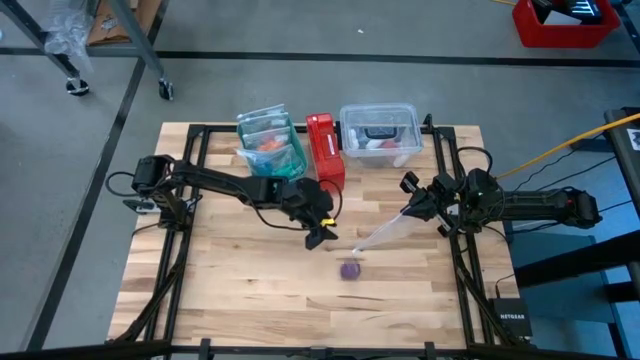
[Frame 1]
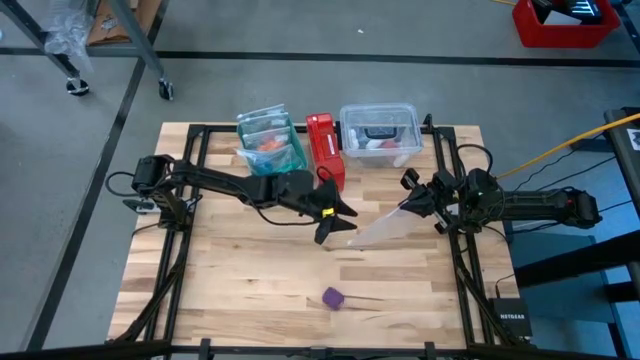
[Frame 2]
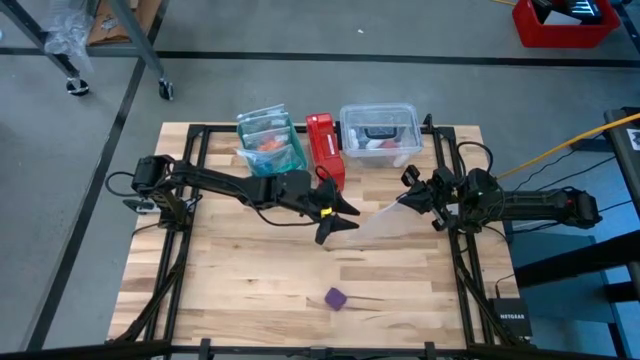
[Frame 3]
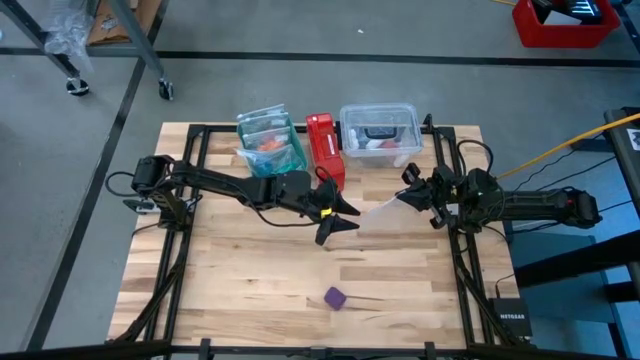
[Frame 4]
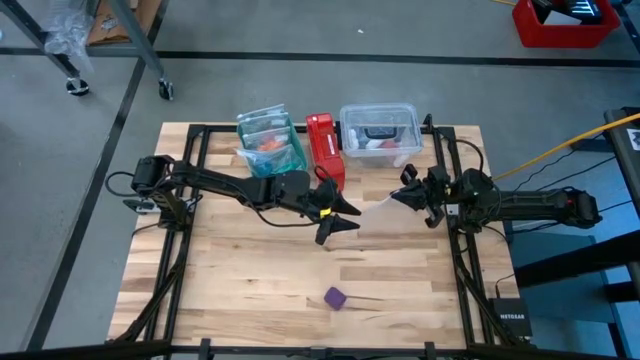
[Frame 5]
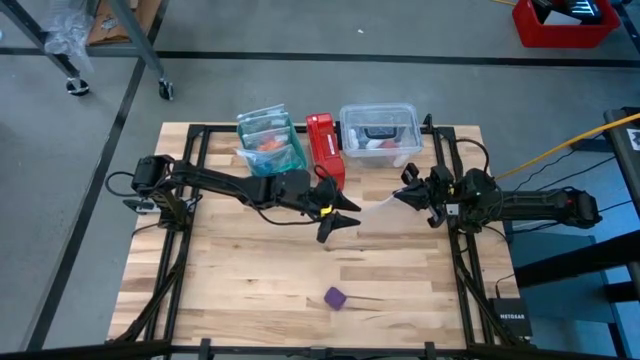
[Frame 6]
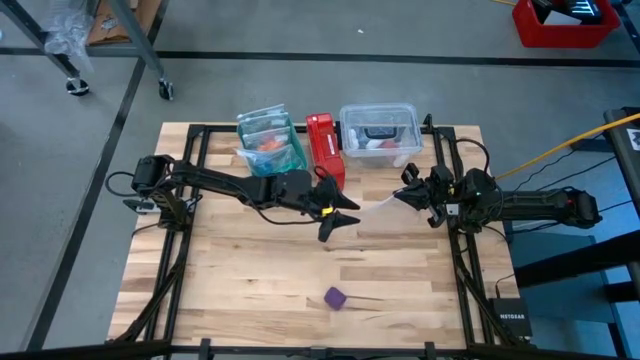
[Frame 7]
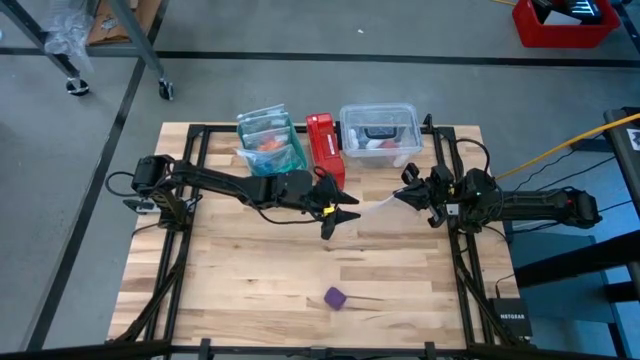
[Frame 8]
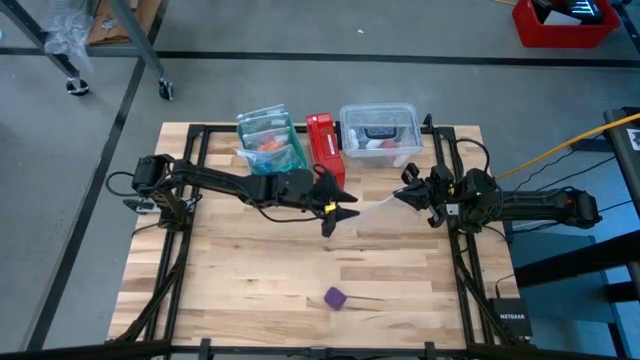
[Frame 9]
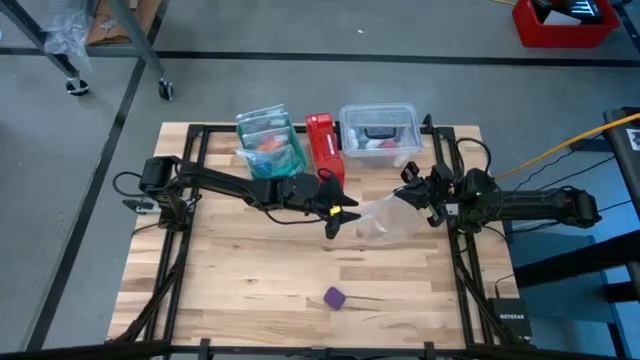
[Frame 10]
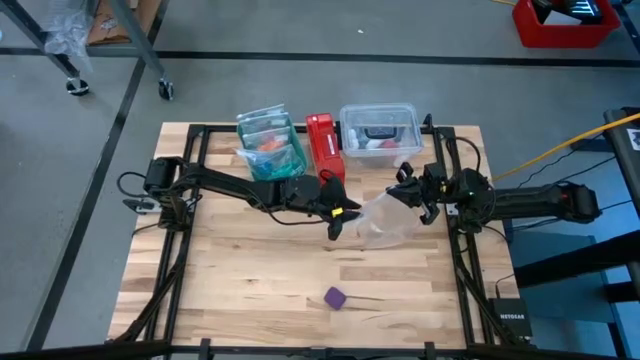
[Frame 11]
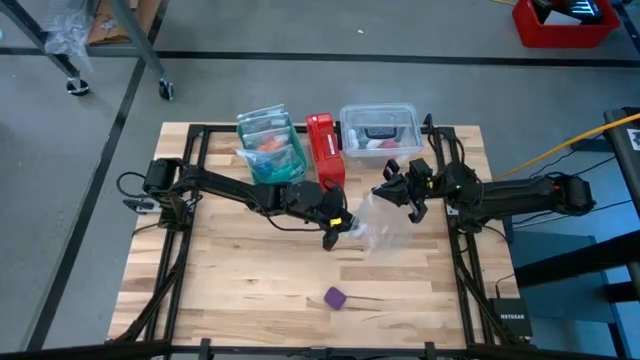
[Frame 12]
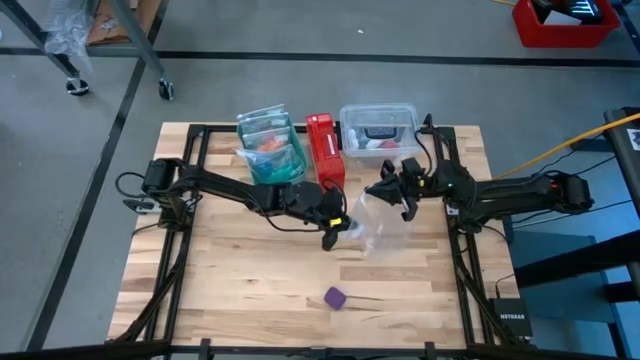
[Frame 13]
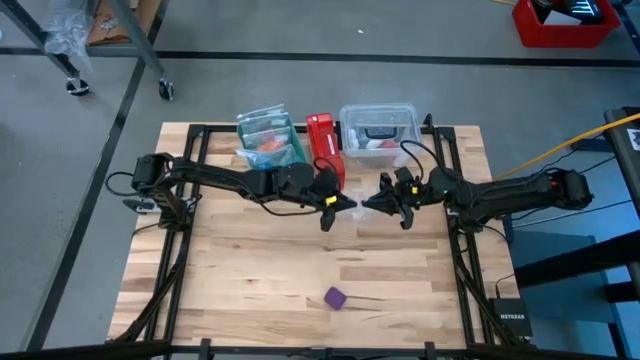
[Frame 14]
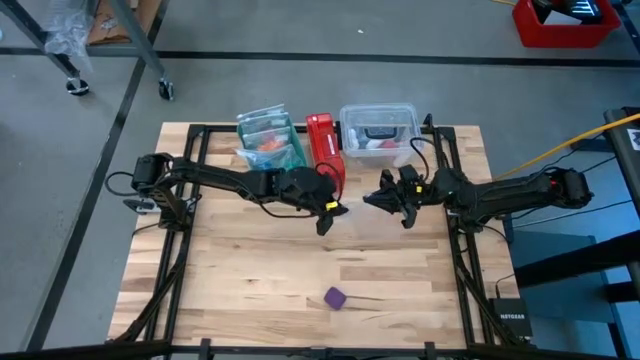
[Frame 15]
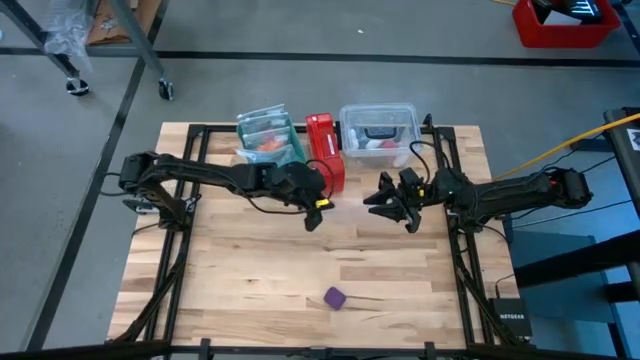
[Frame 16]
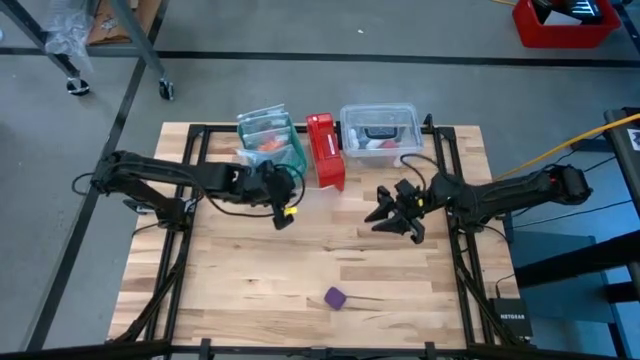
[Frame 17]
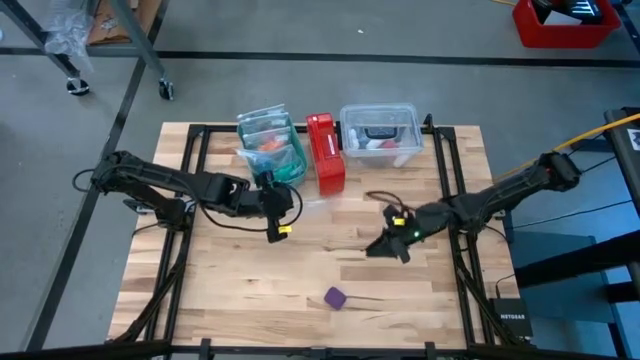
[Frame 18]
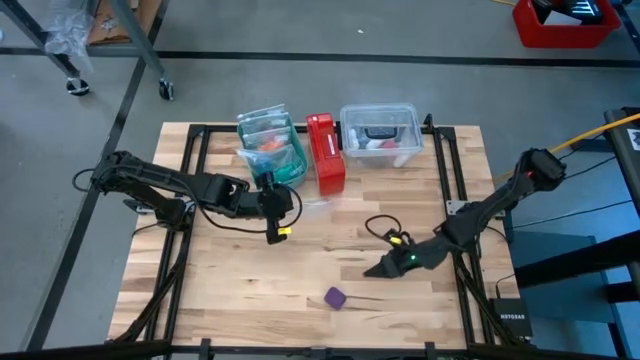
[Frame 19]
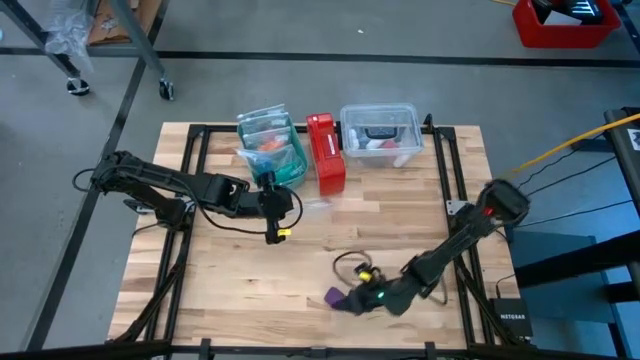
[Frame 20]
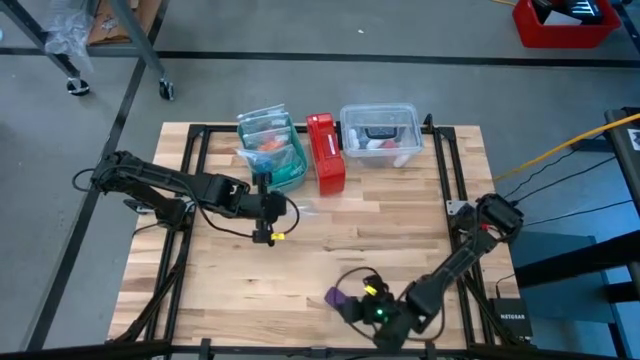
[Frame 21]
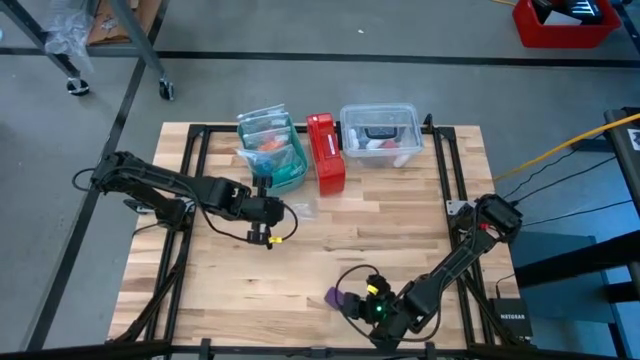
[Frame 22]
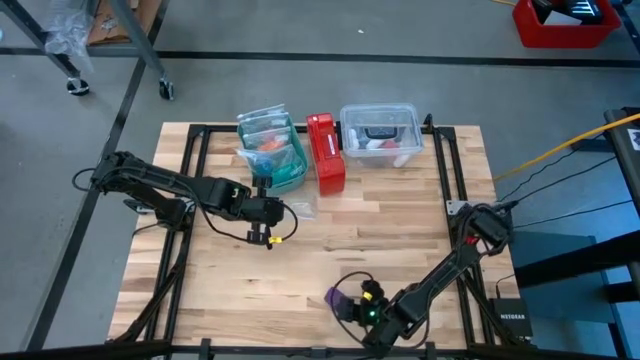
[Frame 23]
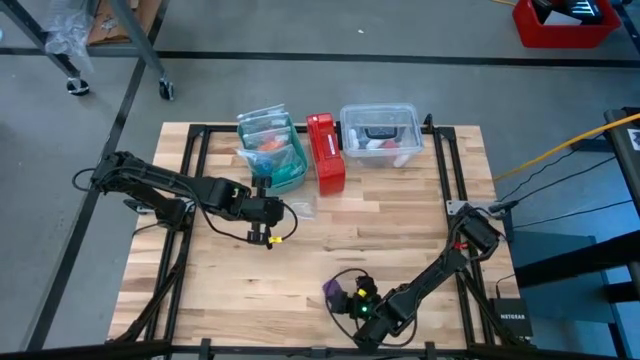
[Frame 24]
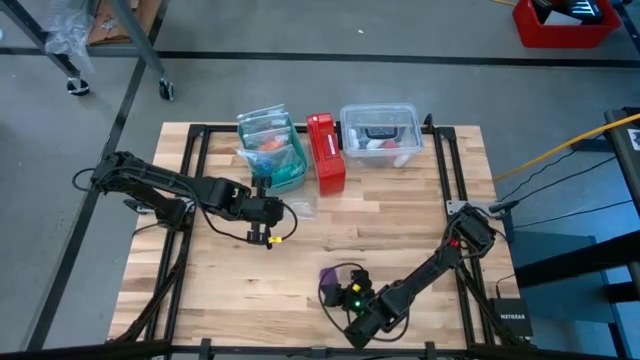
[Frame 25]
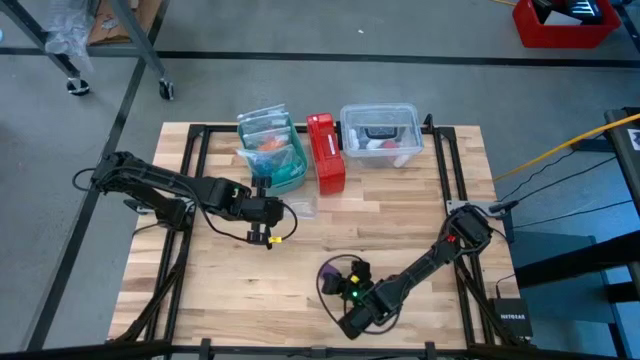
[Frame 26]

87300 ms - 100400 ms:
Task: Roll bandage
Put the purple bandage into the transparent zip bag

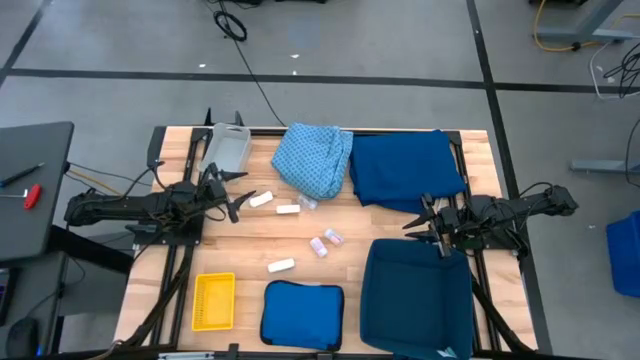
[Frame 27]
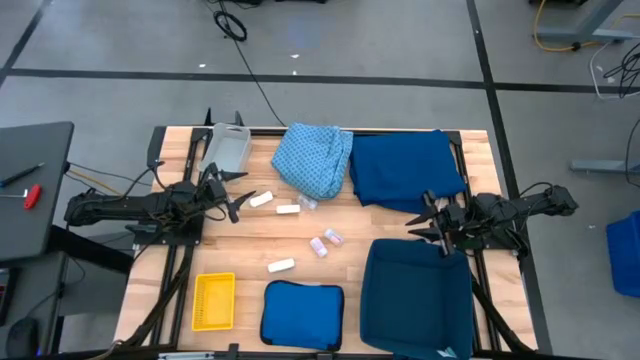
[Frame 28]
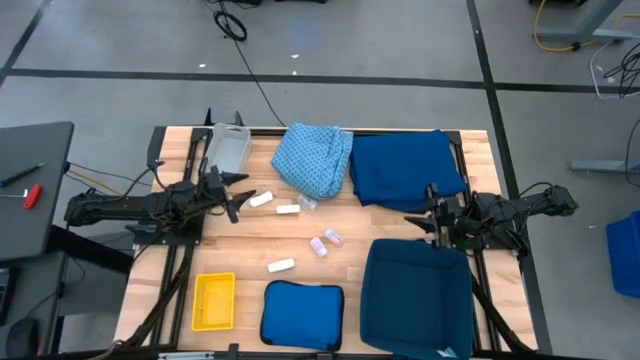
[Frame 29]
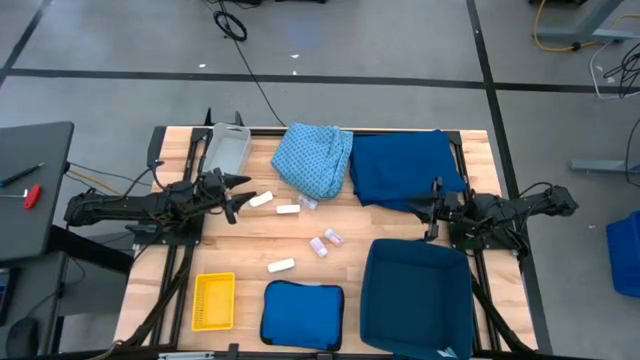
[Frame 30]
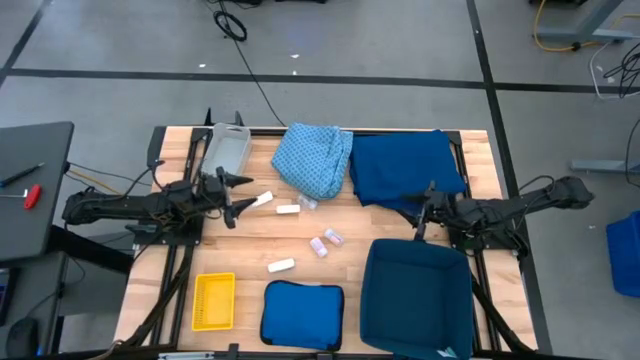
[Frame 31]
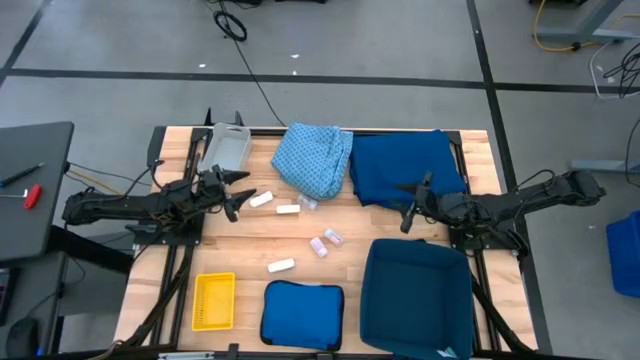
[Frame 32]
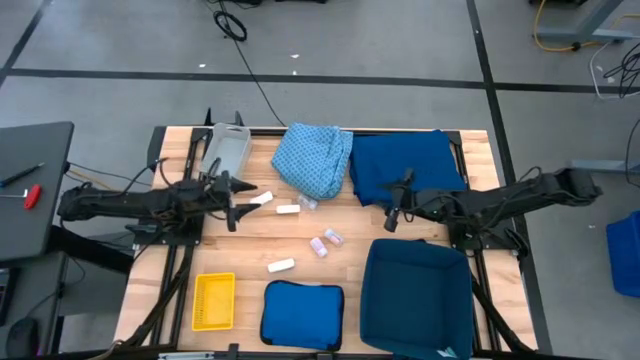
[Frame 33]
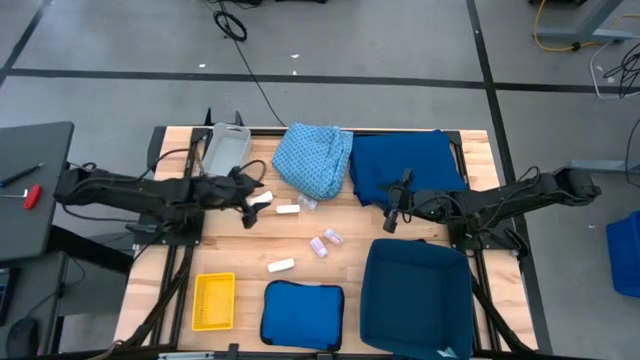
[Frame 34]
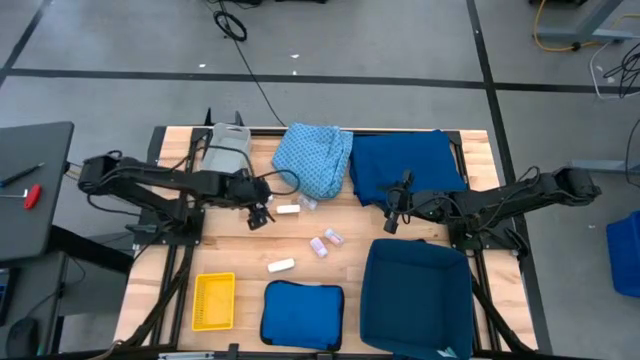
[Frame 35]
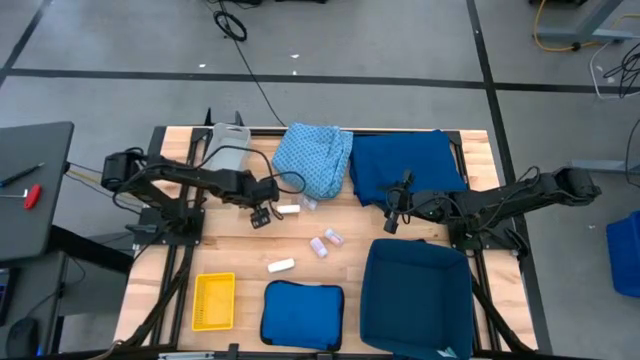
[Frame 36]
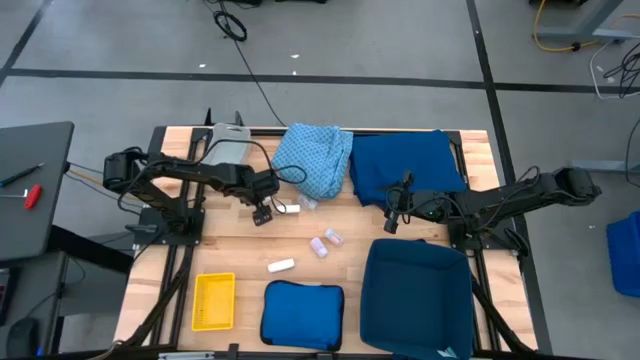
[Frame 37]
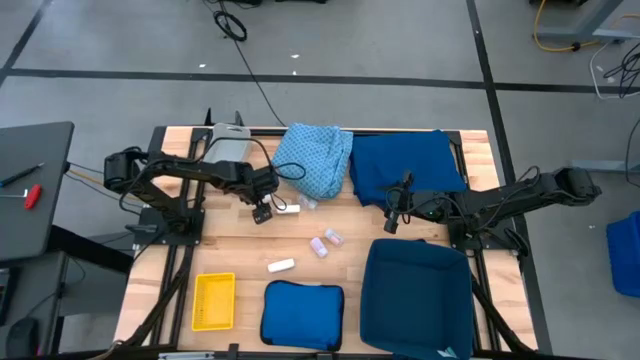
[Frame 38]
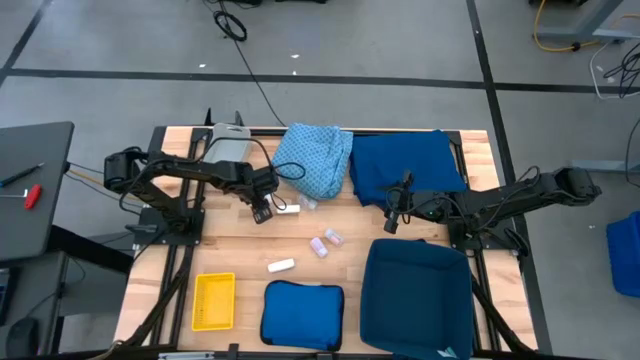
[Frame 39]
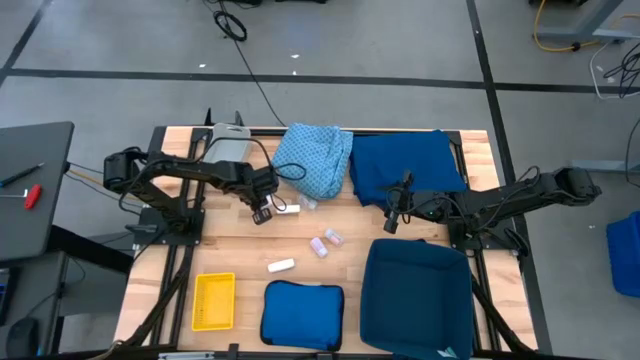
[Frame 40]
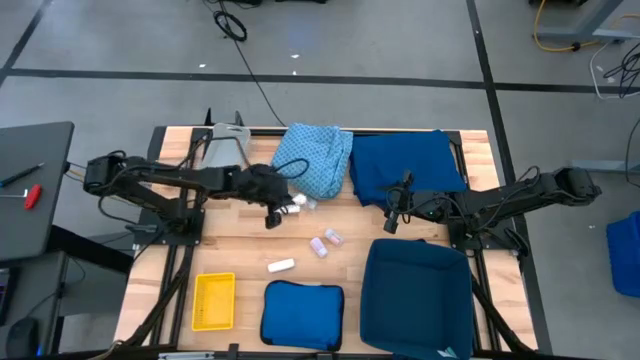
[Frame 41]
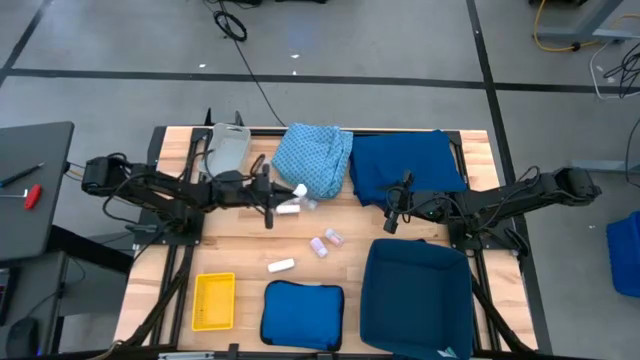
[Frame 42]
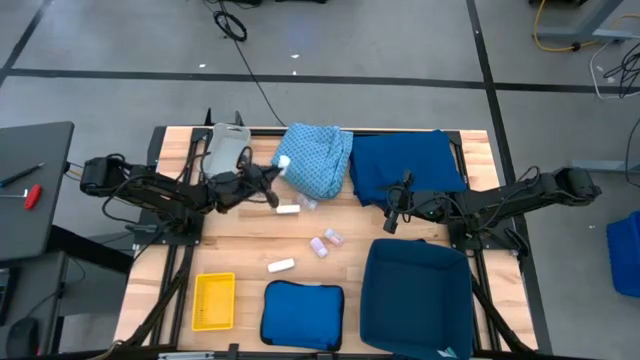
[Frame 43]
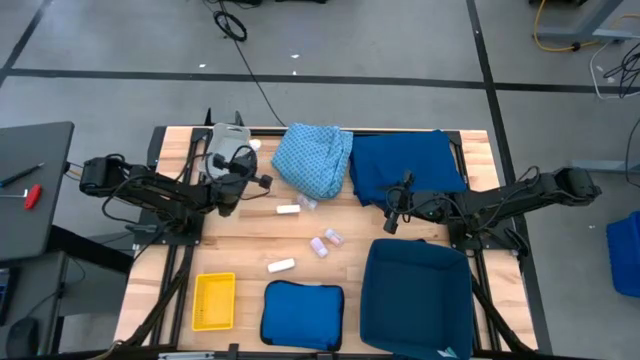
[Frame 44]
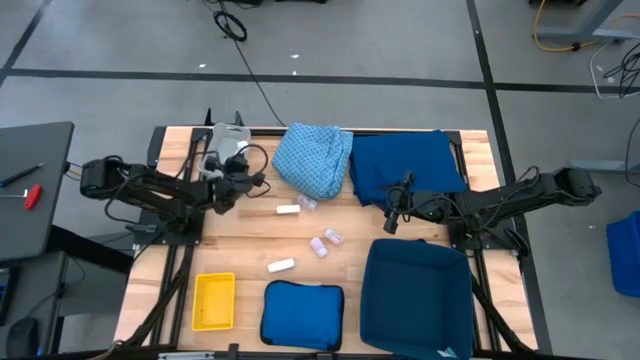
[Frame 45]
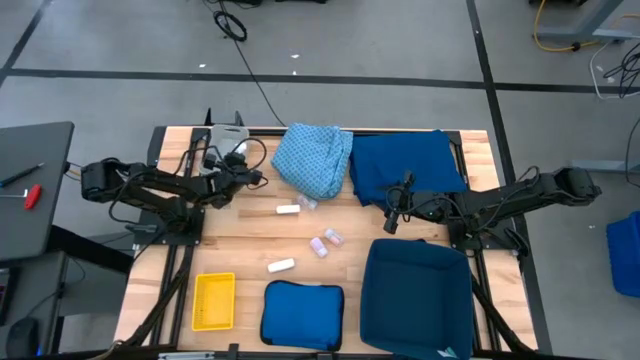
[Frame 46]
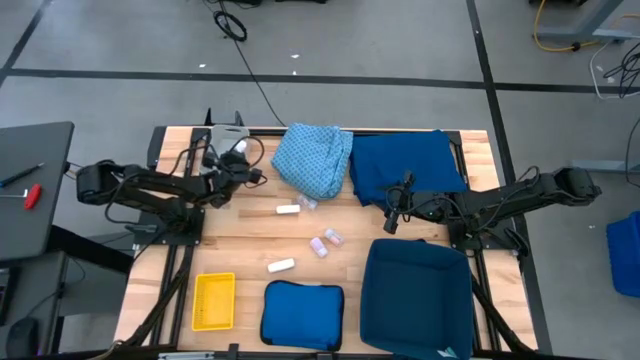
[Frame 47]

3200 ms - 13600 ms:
Task: Pick & place medical supplies in basket/bin
Put the top white rolled gauze into the gray bin
